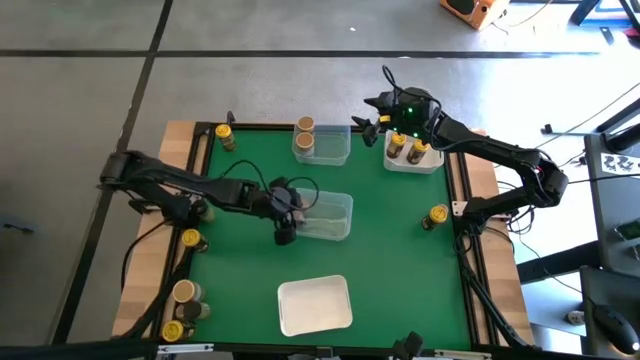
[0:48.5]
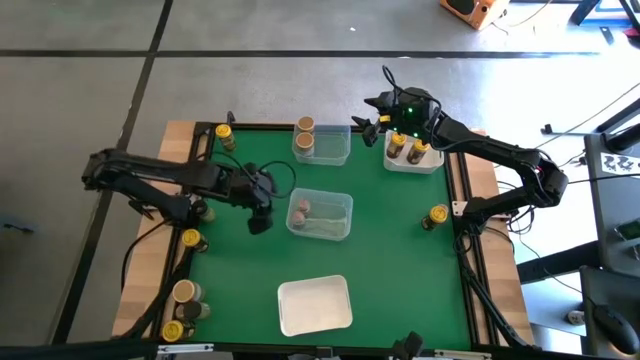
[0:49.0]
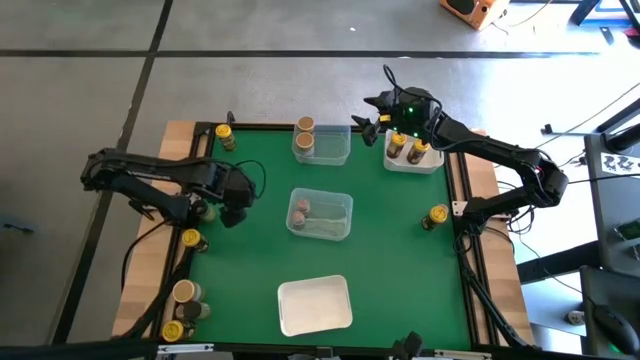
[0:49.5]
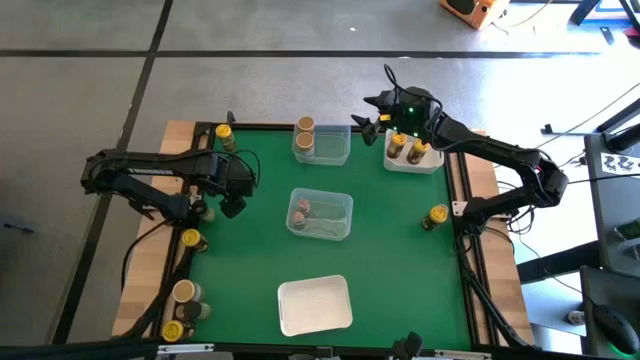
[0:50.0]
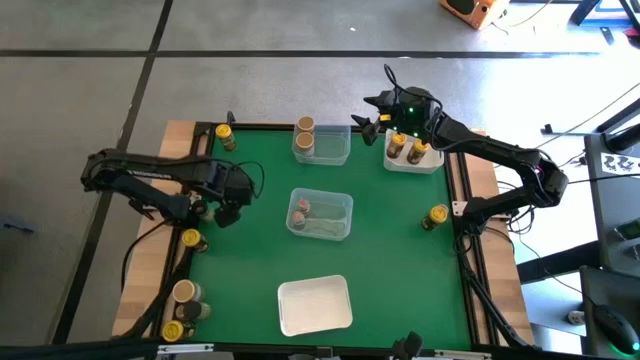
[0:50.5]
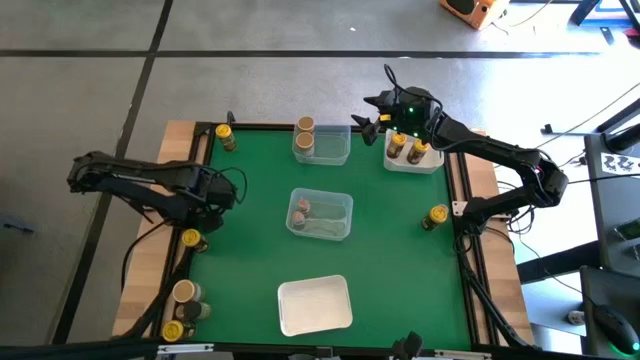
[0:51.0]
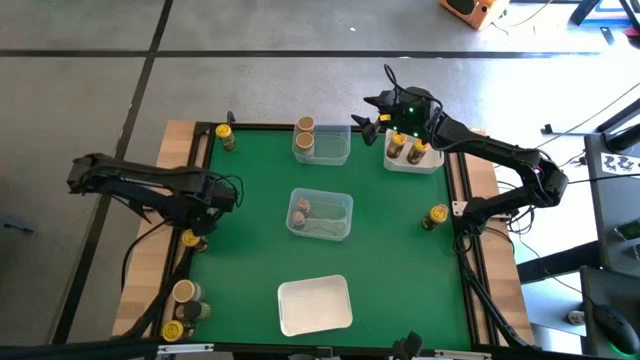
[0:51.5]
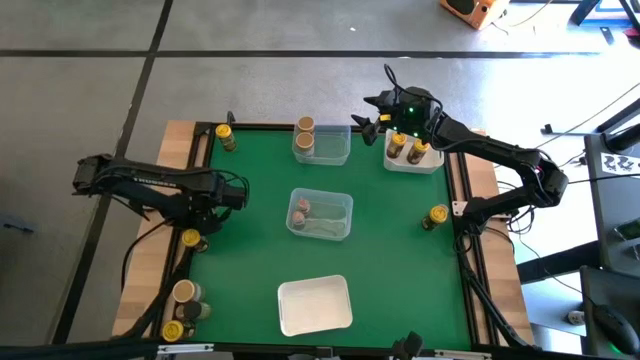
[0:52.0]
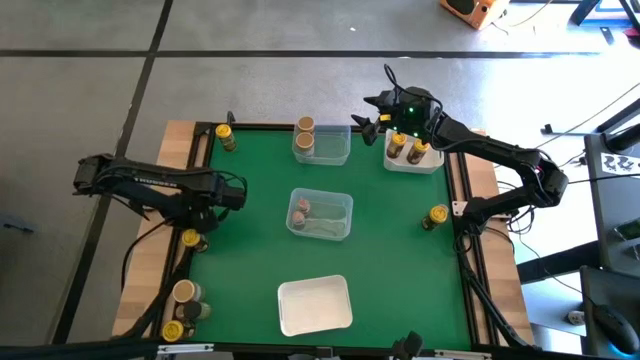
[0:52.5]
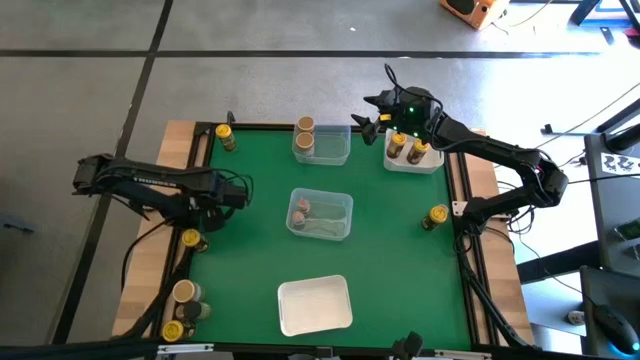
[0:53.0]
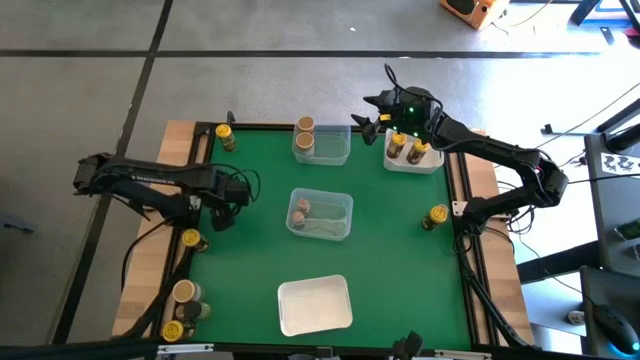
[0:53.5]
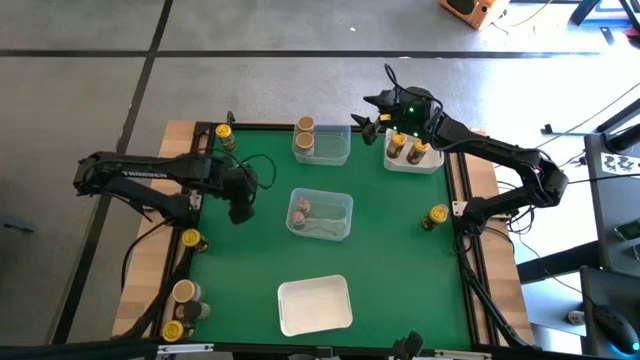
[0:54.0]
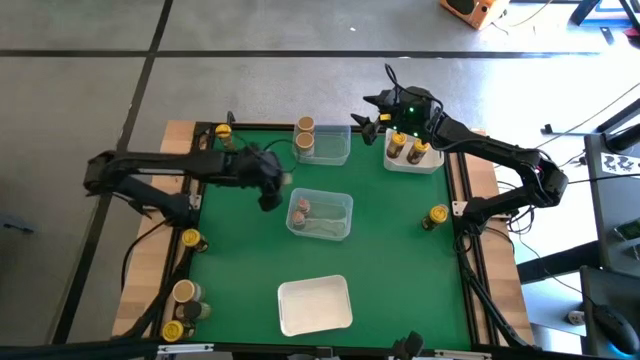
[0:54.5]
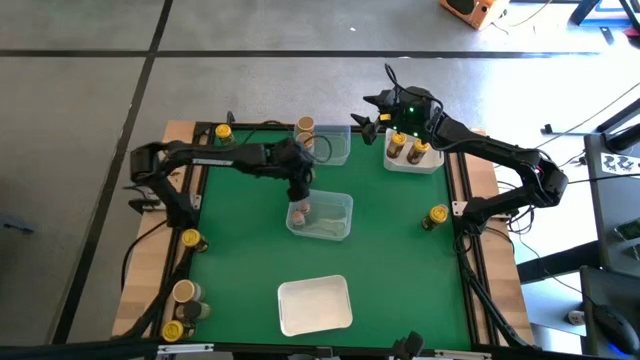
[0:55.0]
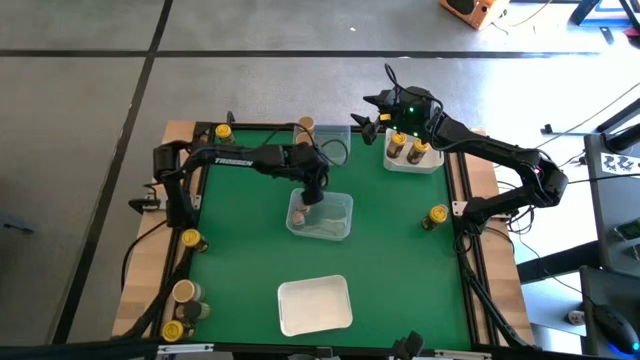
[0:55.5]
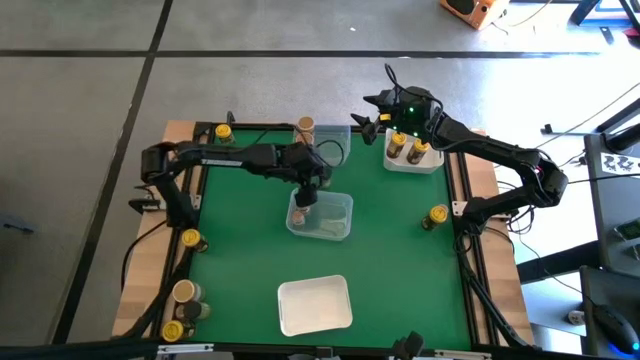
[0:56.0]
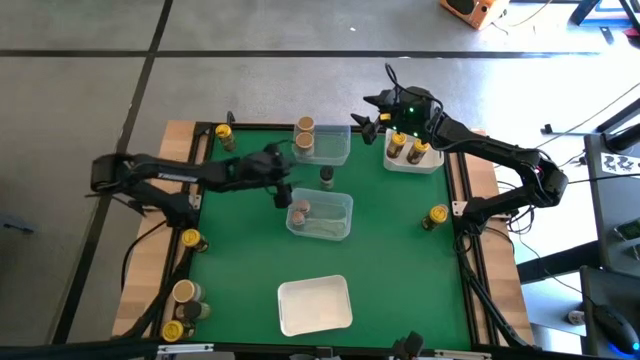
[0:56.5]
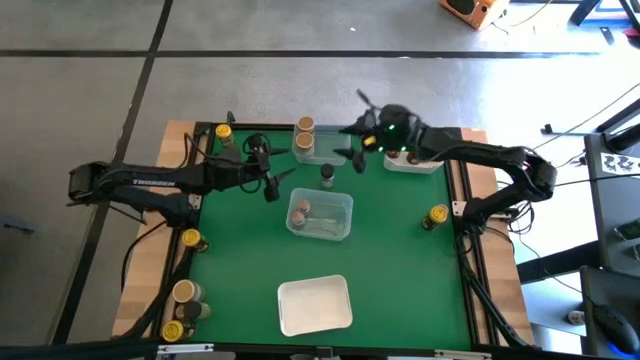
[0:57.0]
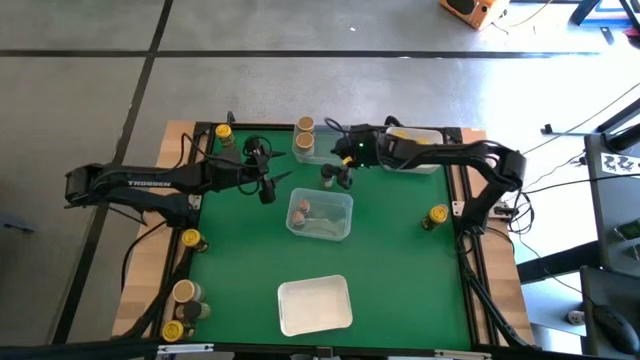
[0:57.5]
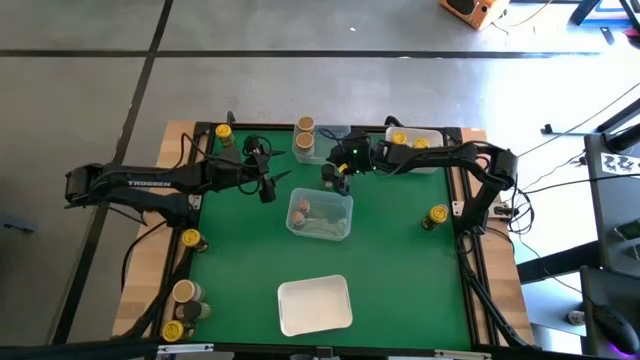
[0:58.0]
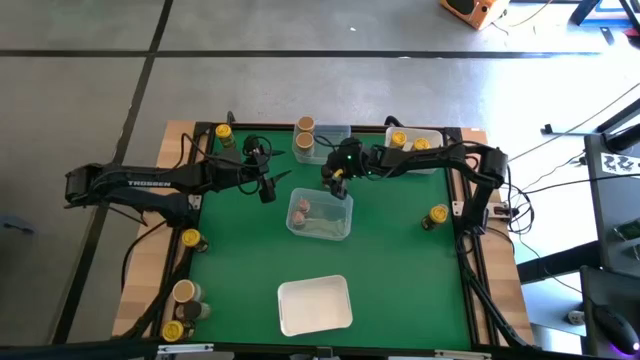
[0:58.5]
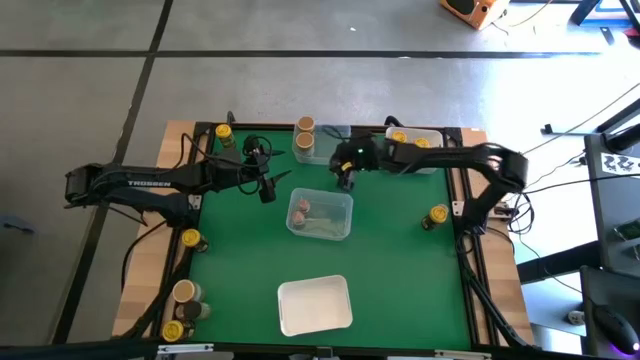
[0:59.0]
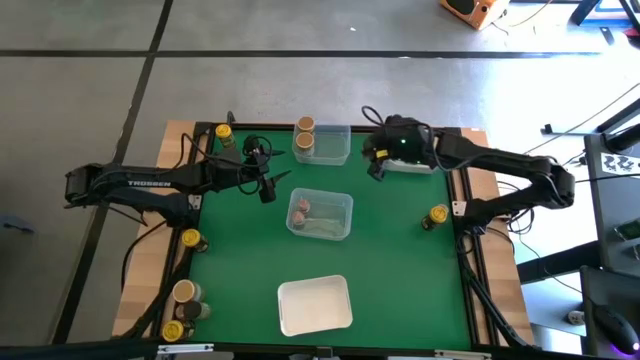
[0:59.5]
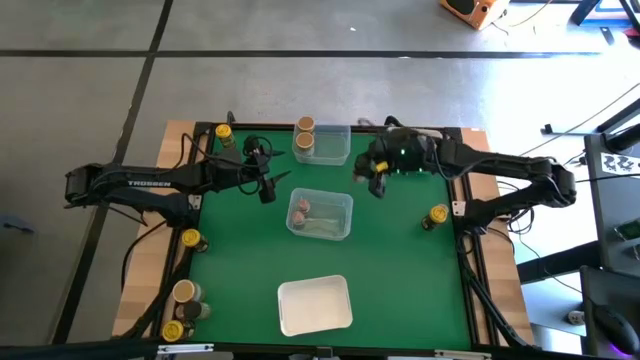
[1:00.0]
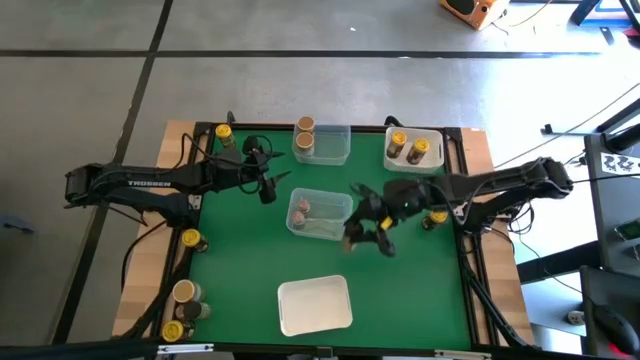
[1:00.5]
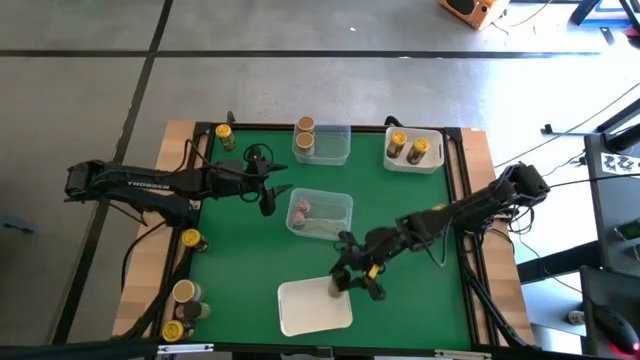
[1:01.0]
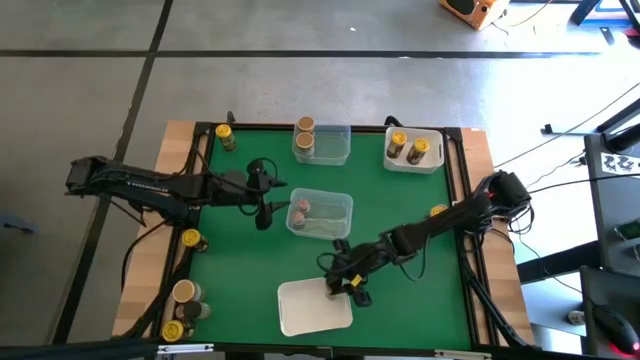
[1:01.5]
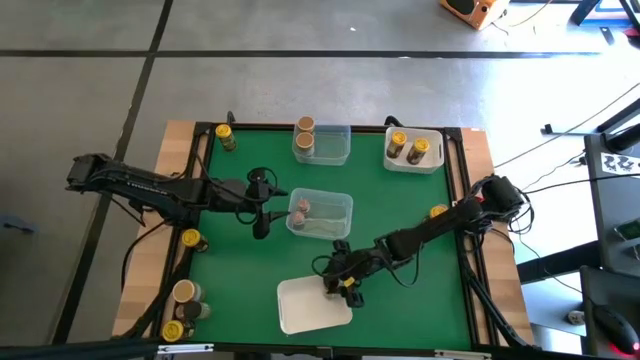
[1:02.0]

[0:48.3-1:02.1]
Task: Sort spices by type
Put the black seasoning bottle into the bottom white bin

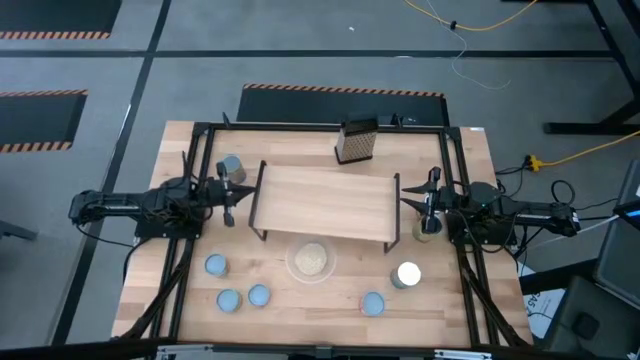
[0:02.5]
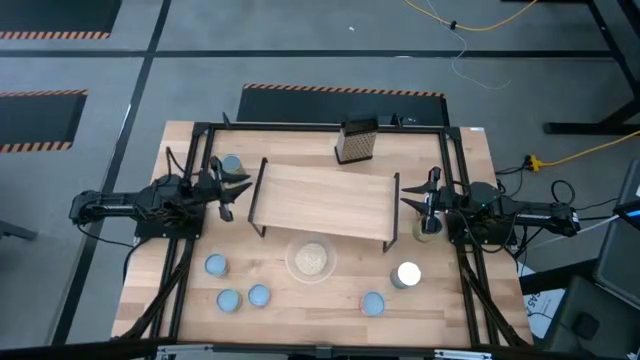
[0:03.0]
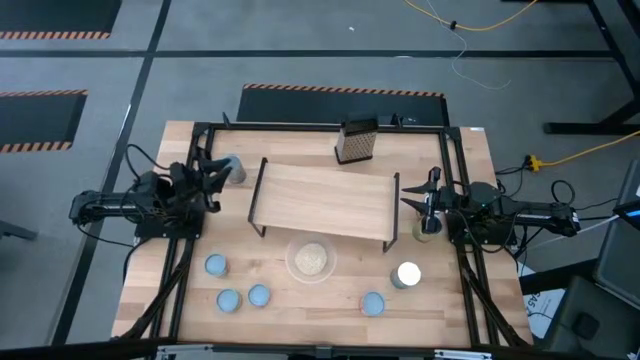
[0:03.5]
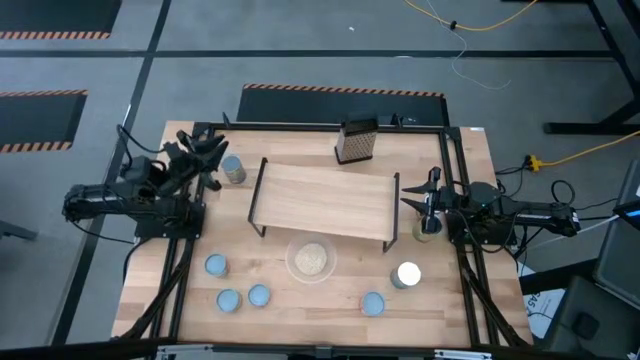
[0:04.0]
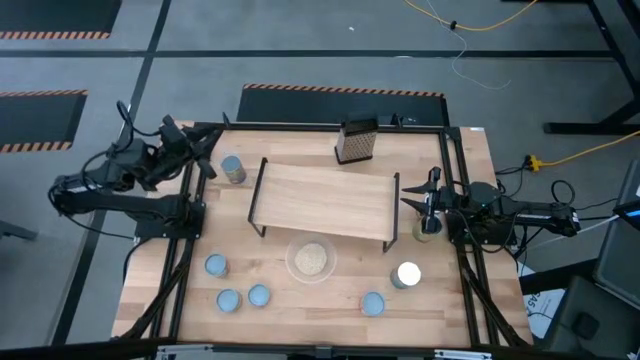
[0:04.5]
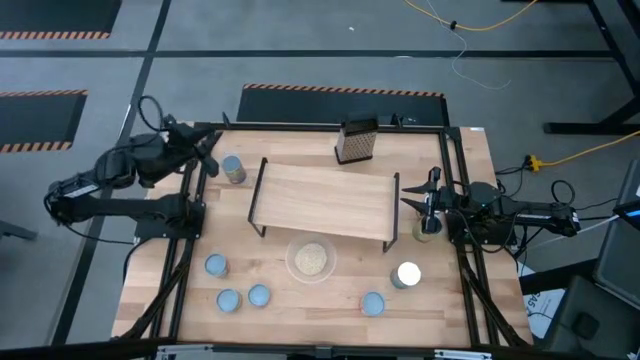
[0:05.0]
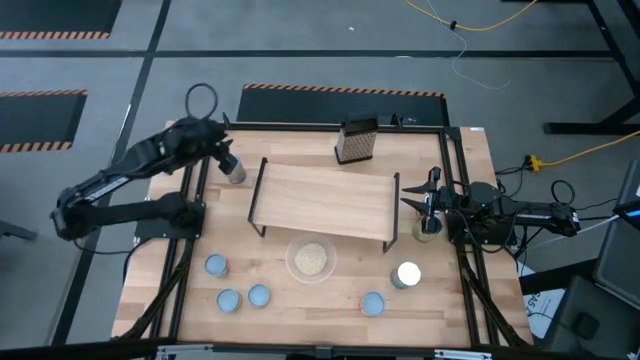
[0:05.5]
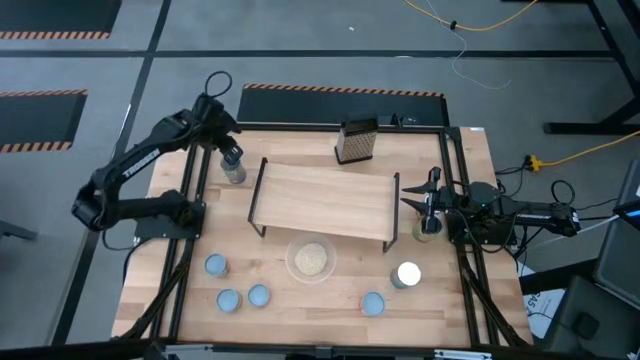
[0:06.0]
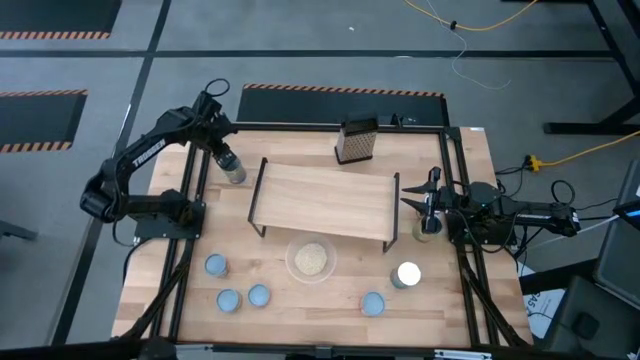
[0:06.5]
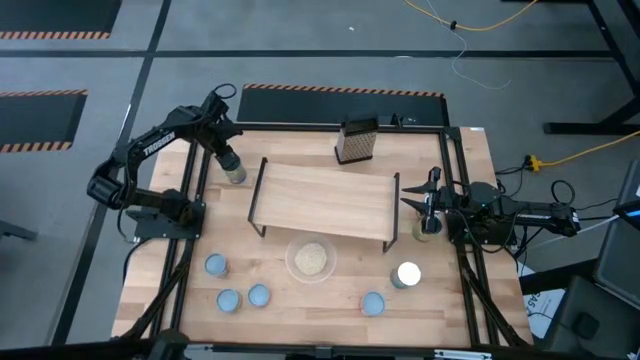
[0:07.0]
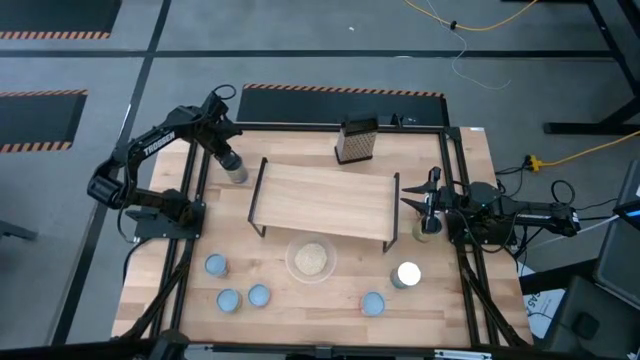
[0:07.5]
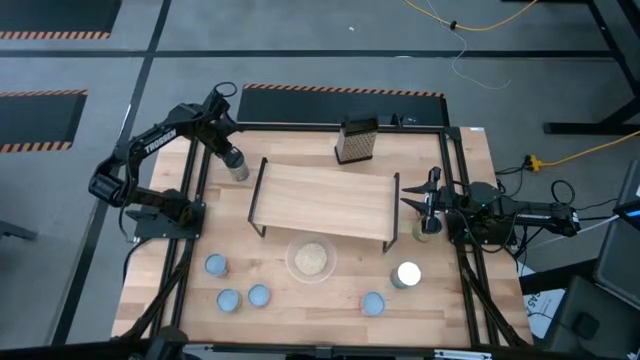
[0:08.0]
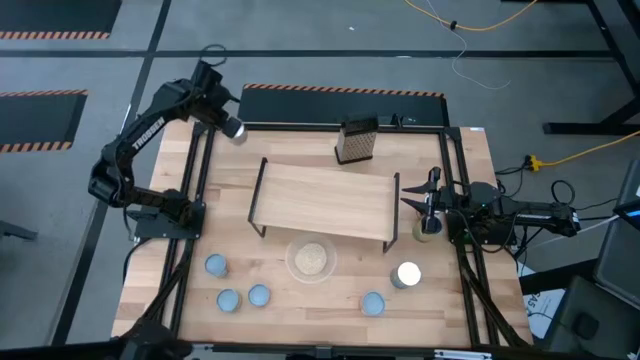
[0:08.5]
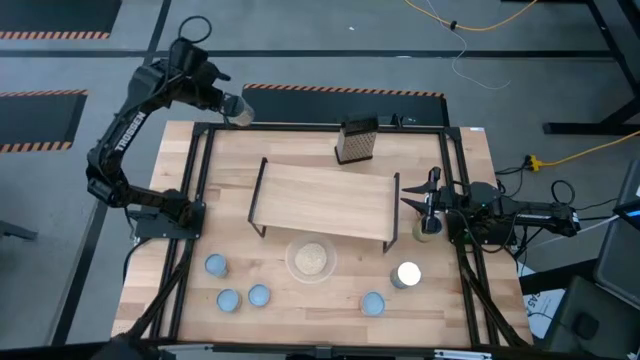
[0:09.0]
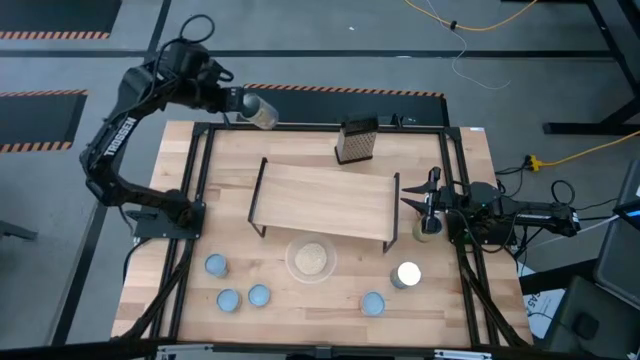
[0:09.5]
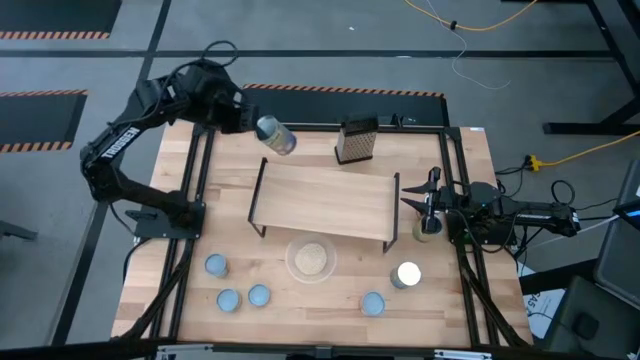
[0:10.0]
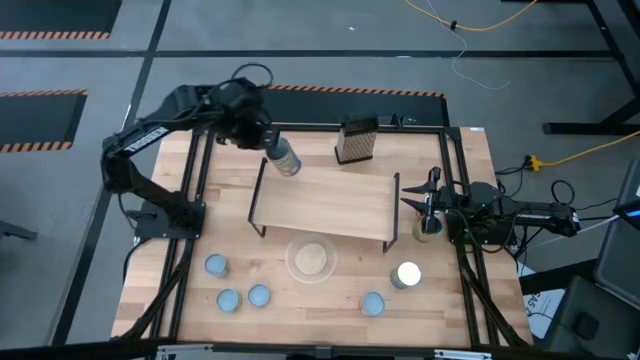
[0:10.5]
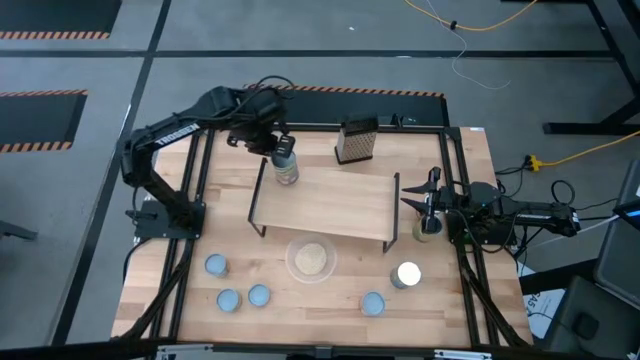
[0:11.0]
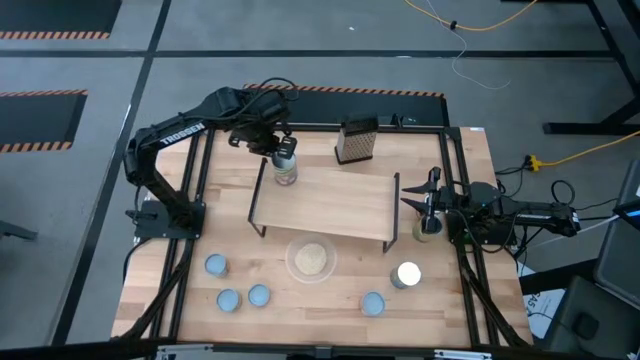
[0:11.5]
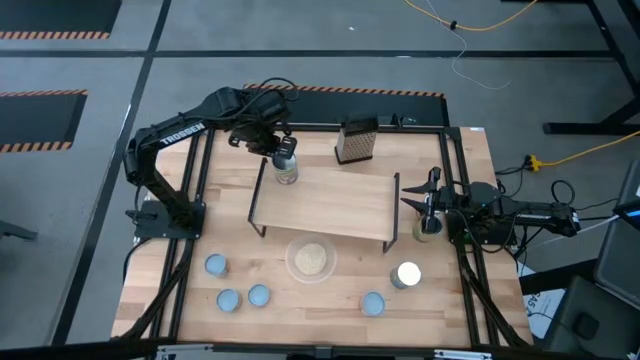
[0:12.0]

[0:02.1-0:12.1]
Task: Pick and place cans onto a shelf
Put the large canned peaches on the shelf
